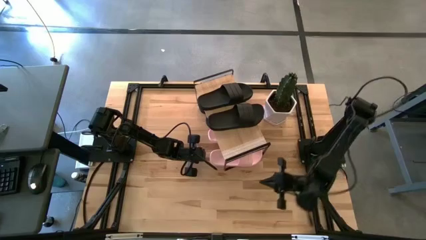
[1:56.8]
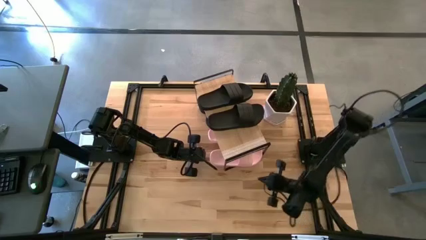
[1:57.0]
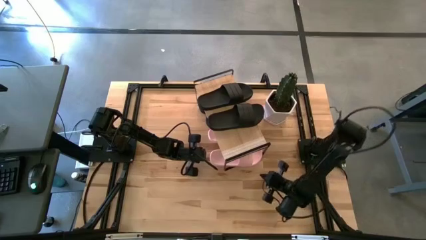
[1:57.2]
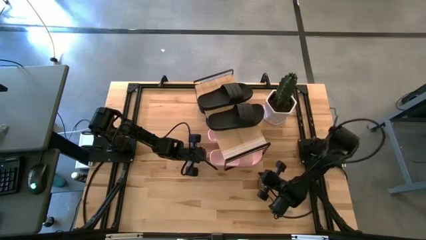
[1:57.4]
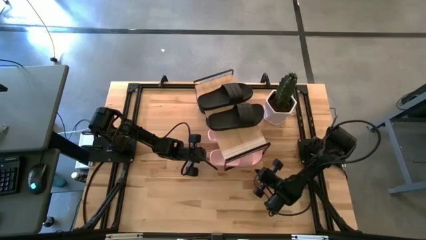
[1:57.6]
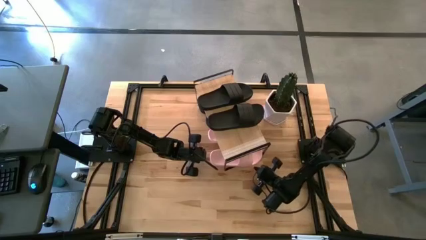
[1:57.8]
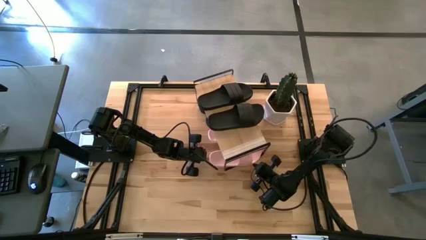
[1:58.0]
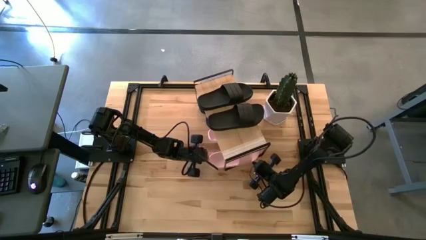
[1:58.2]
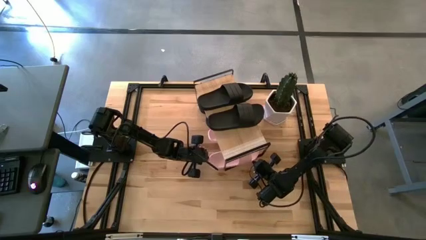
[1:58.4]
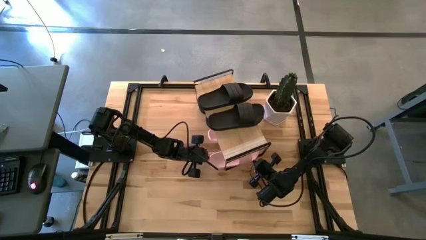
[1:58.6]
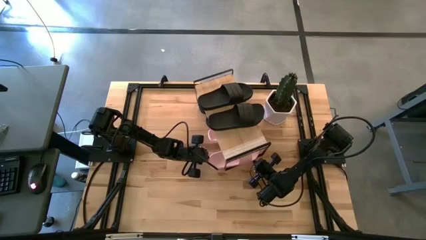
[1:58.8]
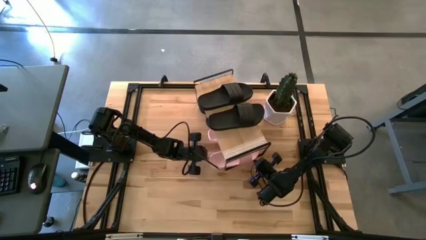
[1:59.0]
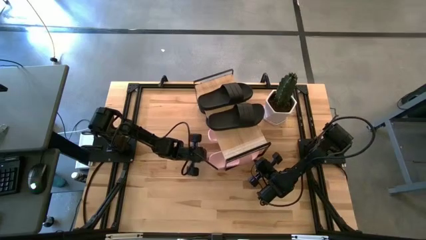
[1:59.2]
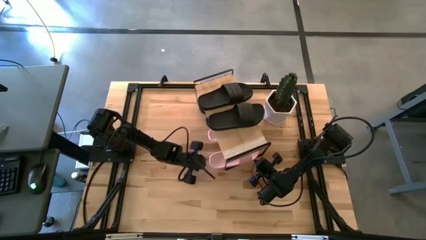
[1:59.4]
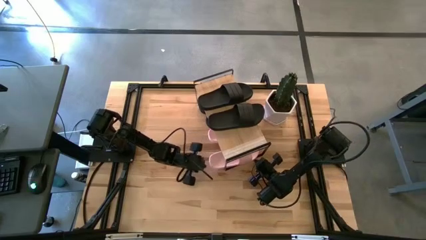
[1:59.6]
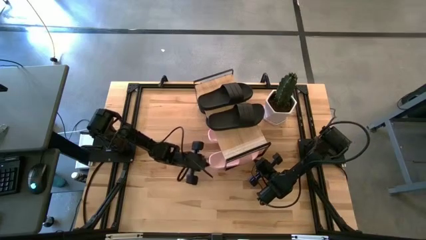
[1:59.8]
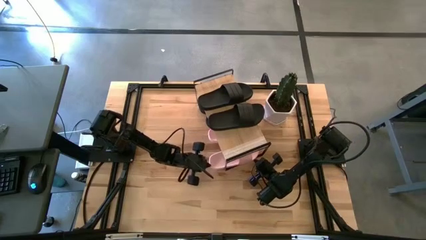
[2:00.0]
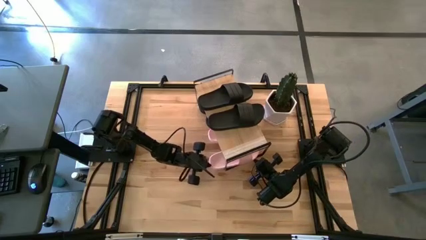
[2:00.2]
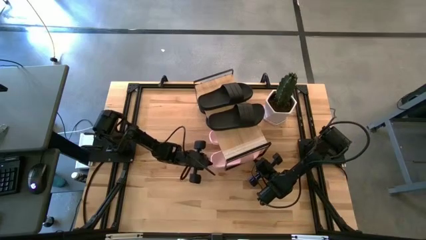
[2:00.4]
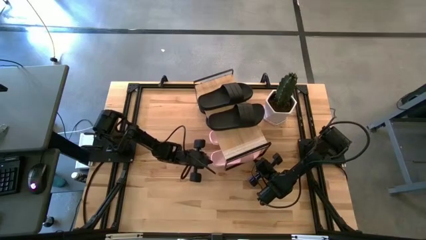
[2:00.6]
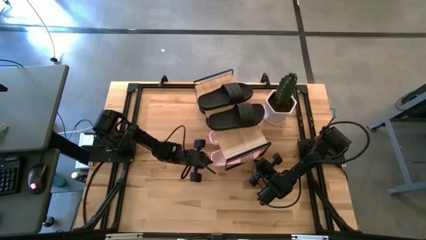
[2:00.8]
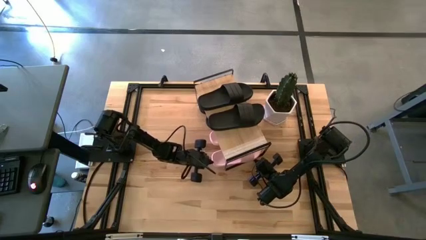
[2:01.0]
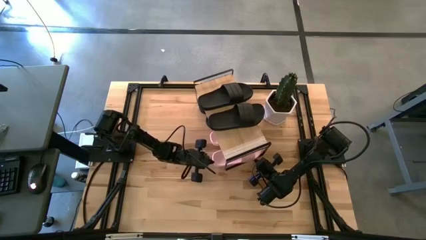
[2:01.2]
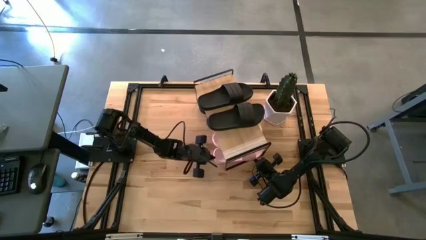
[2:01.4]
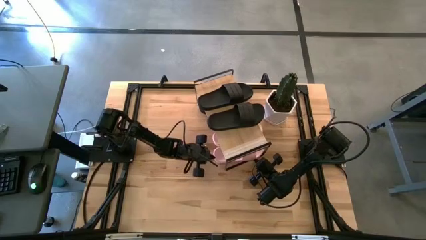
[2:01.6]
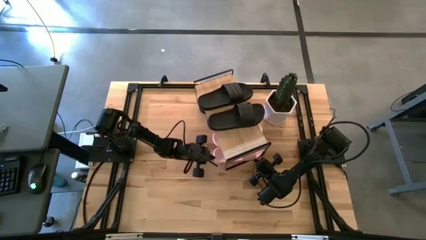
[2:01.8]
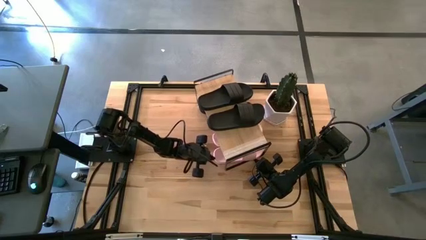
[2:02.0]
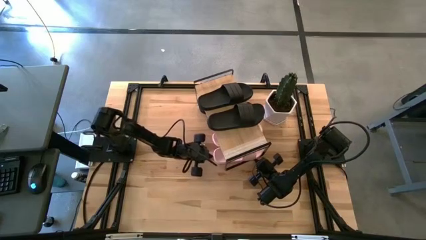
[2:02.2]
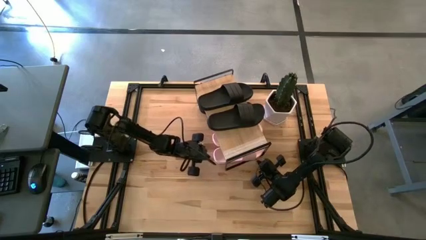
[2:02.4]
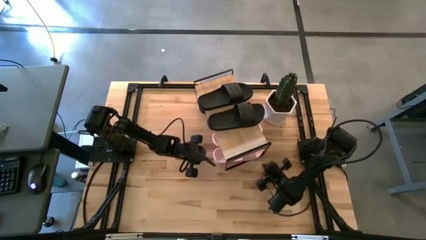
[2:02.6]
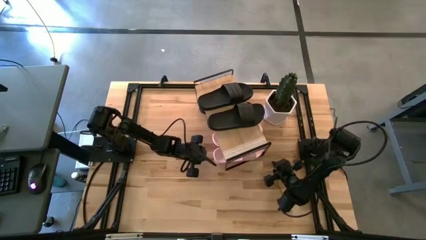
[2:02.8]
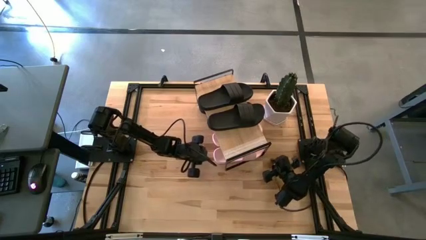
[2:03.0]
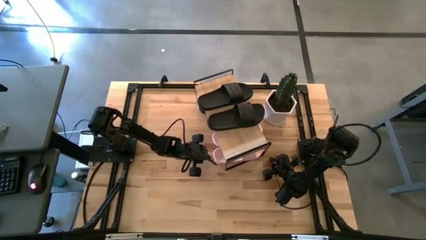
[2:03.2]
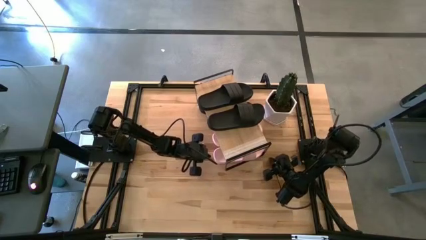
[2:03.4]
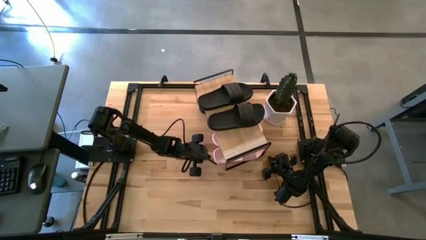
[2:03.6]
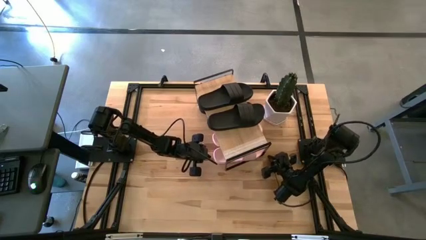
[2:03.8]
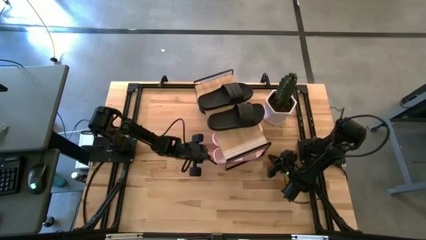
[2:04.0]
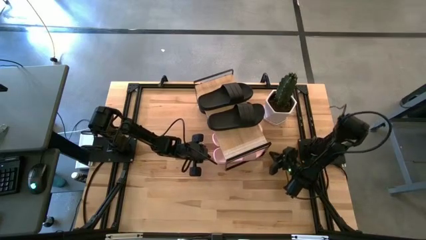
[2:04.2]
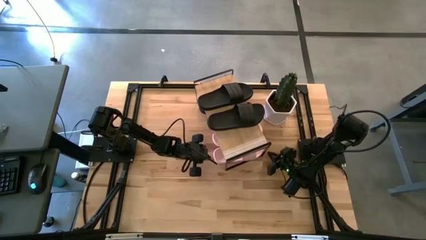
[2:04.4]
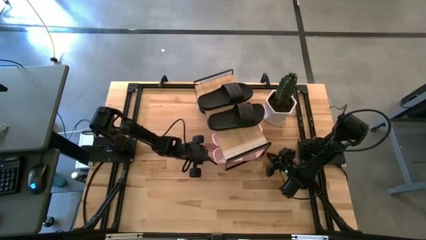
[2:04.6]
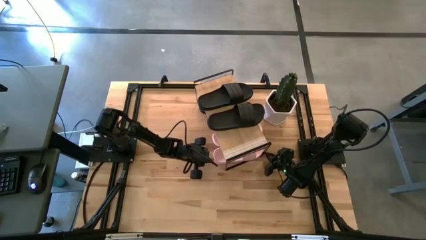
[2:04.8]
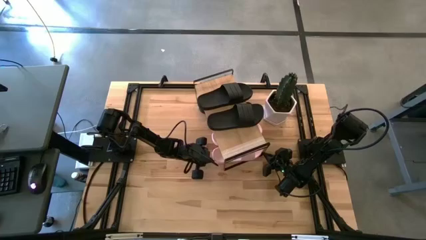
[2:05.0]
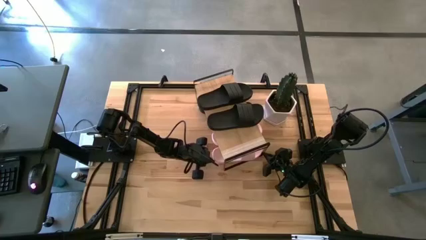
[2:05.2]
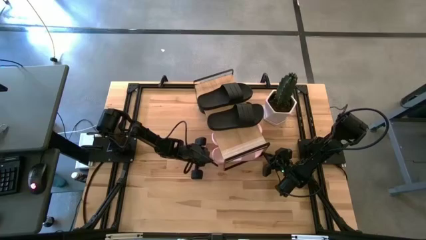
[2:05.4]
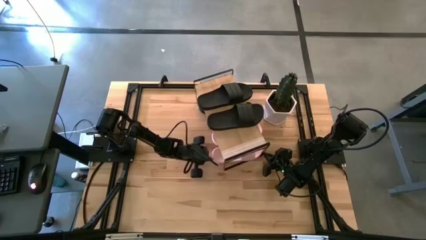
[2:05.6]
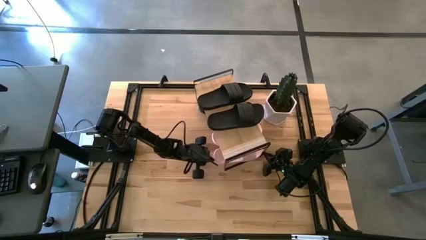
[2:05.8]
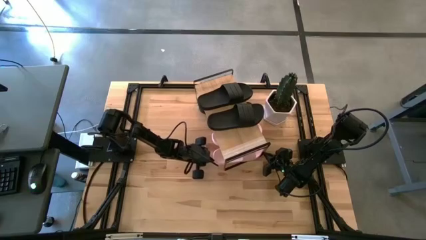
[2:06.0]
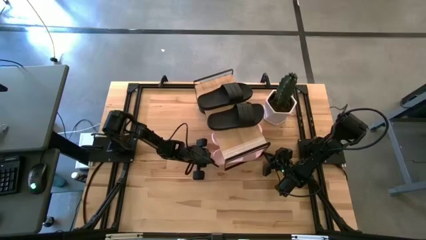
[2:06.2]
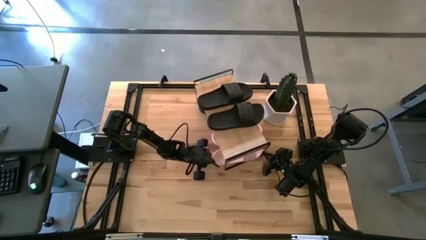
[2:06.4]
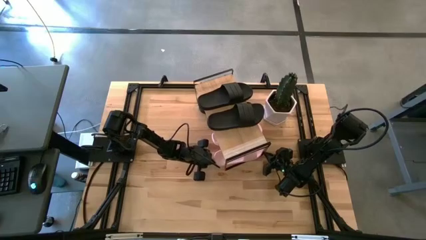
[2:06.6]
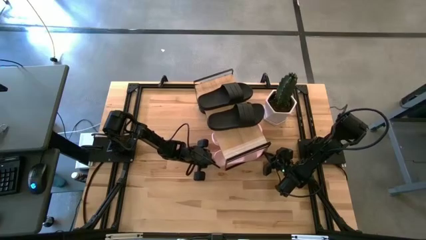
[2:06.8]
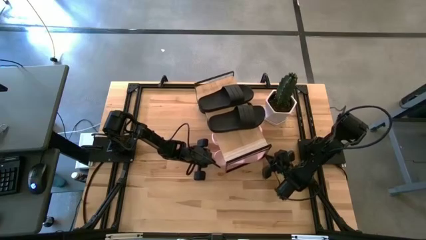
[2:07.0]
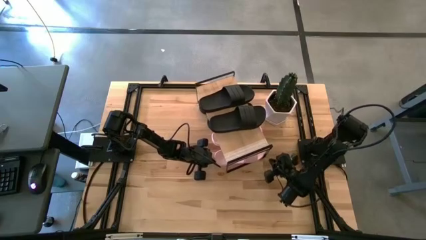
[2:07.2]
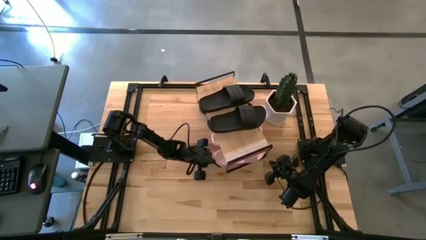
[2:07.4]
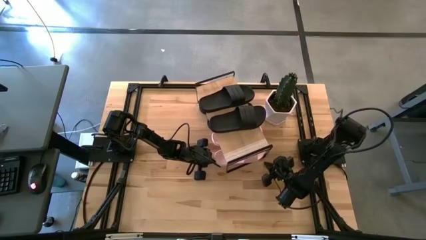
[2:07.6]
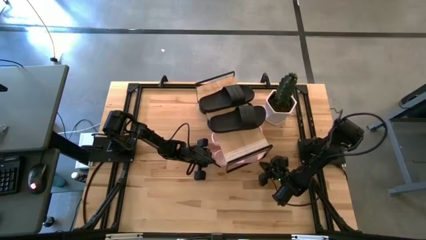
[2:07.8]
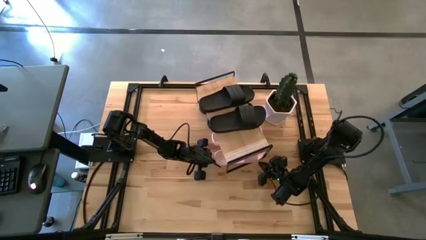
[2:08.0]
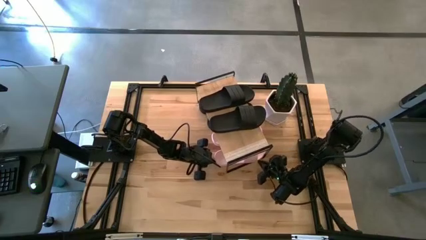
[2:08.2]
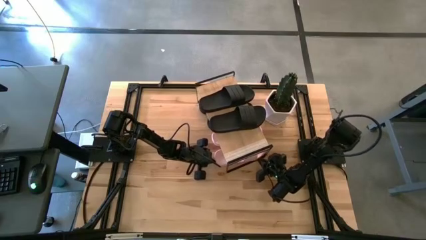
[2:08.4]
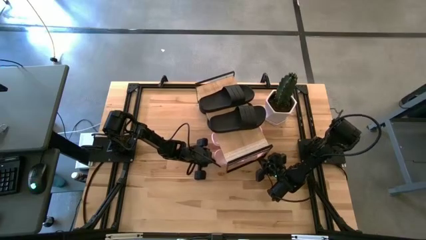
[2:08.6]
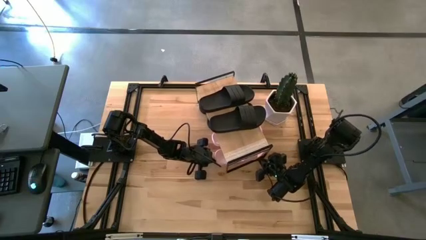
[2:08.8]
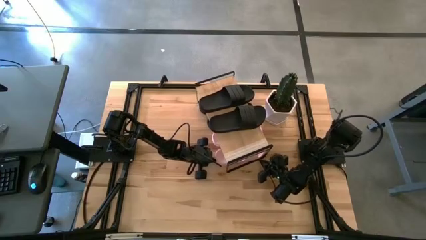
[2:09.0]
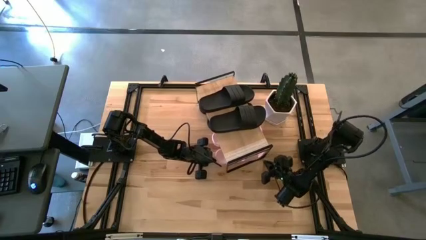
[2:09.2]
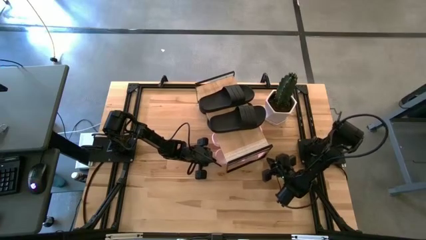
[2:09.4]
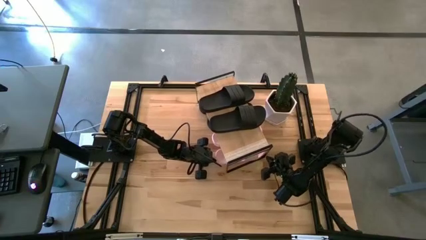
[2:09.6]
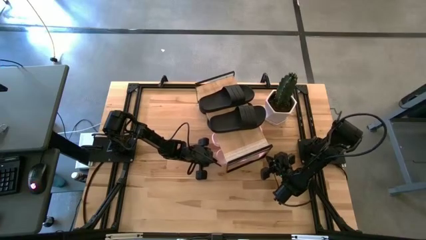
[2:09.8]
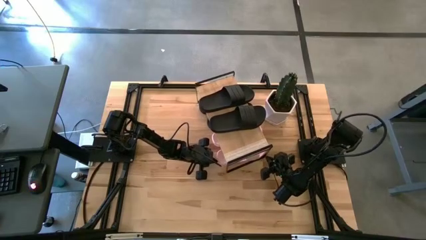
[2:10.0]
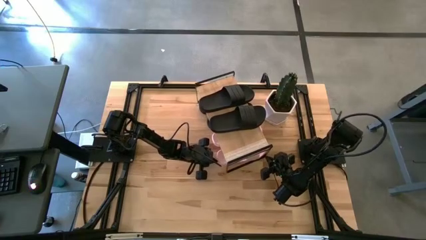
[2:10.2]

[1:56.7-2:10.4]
Task: Pick and place slides into the shelf
Put the pink slide under the shelf

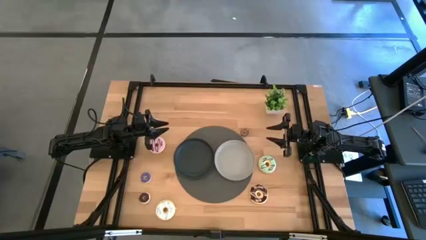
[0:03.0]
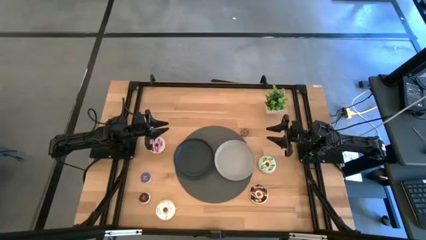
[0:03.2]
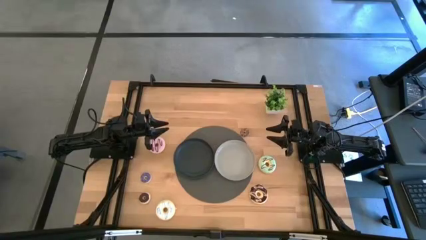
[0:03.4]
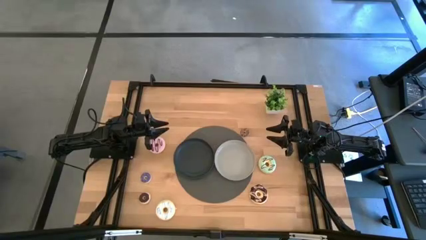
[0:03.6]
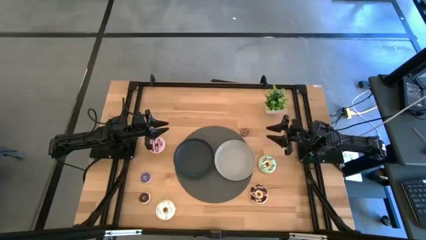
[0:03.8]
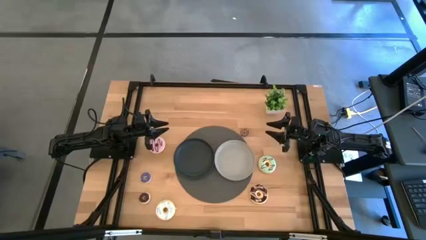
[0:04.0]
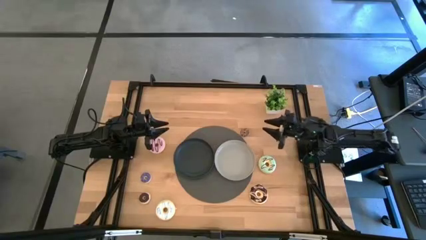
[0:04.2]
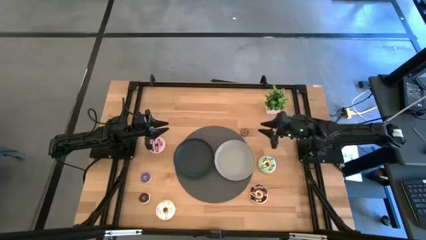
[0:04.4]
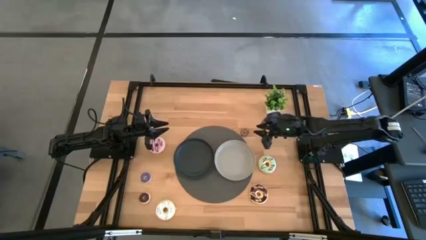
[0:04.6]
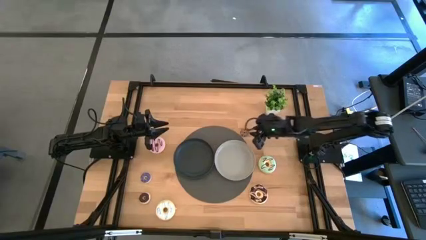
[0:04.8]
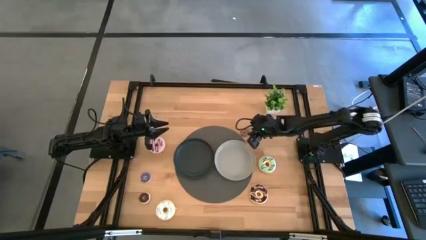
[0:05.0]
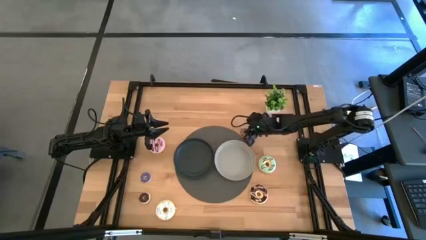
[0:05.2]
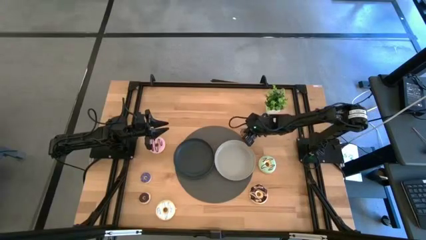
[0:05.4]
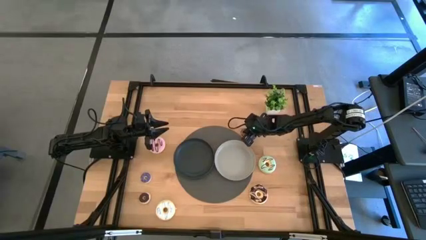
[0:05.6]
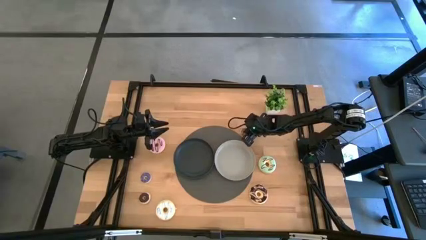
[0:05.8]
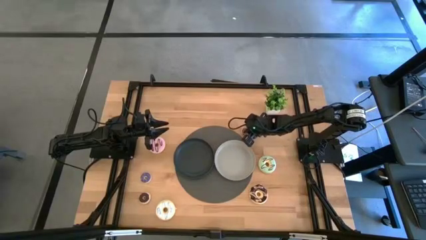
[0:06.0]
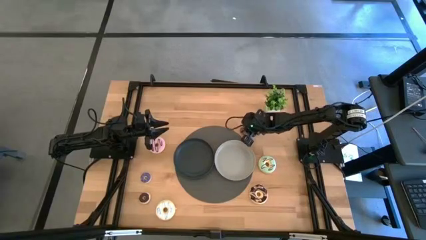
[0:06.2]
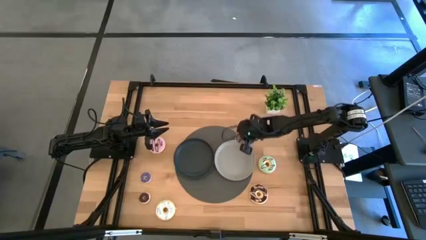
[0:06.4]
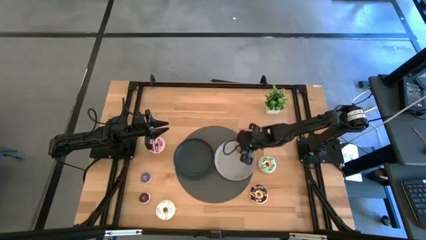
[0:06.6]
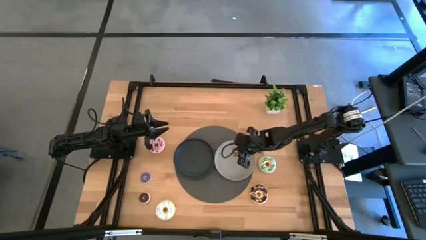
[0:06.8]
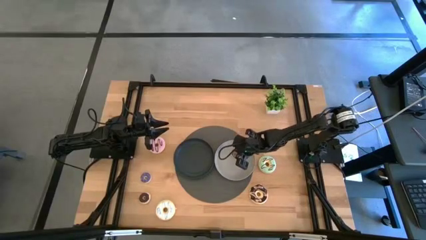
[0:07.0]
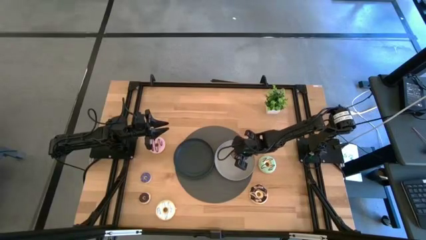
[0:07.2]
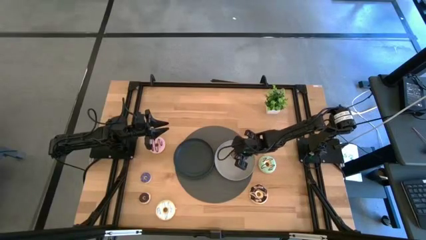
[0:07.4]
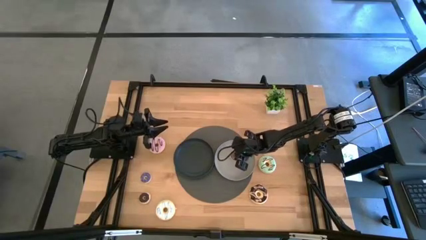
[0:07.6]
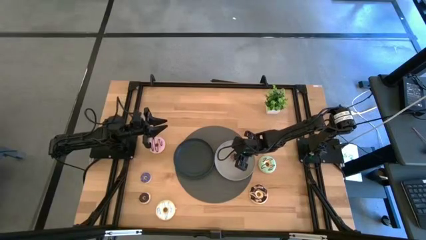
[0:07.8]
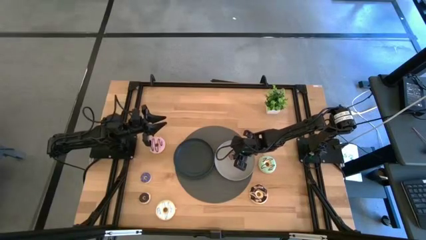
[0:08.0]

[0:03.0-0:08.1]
Task: Pick & Place donuts
Put the small brown donut on the gray plate
